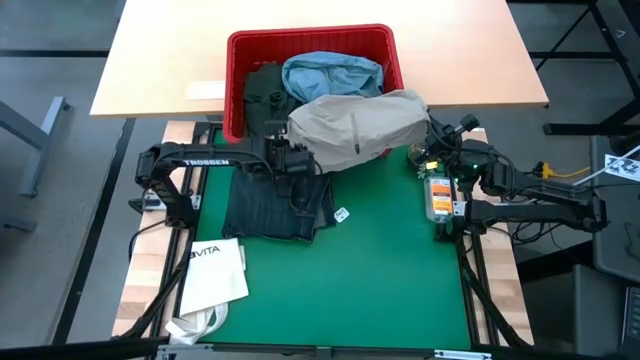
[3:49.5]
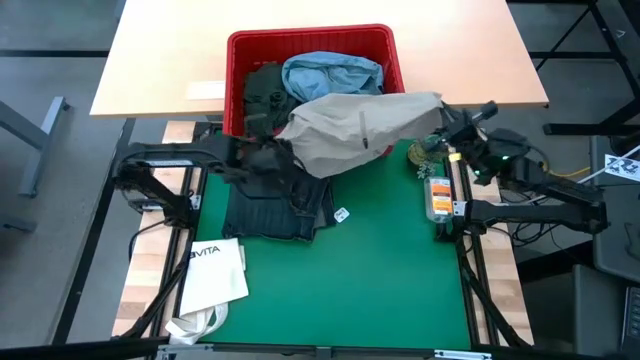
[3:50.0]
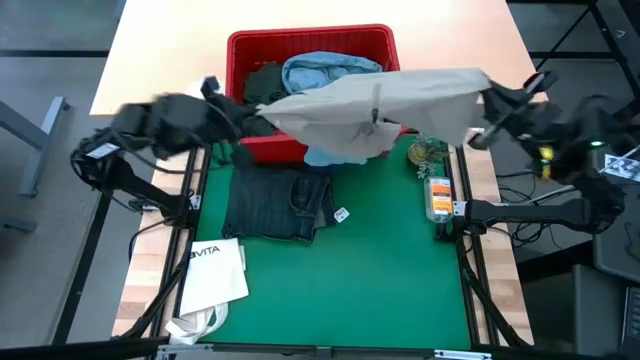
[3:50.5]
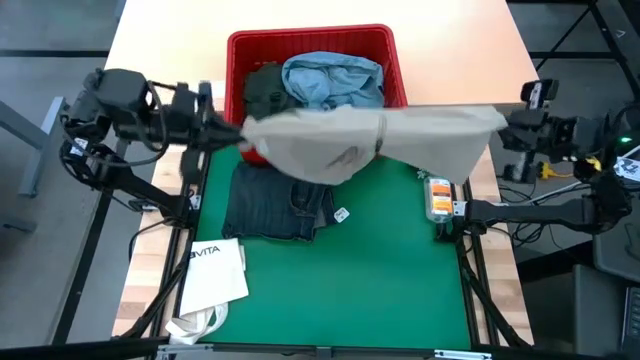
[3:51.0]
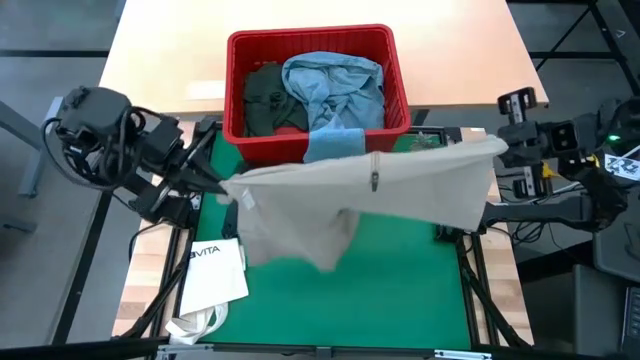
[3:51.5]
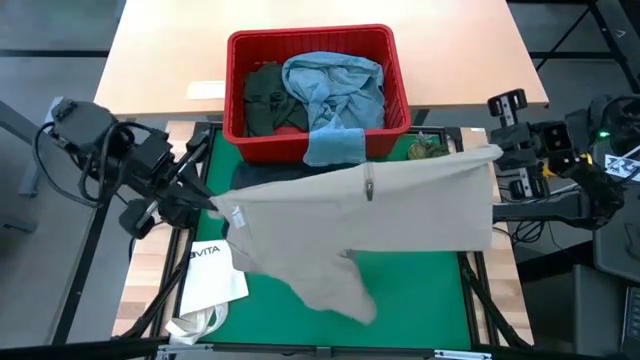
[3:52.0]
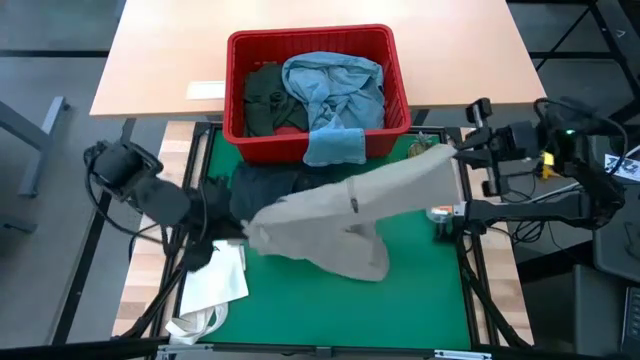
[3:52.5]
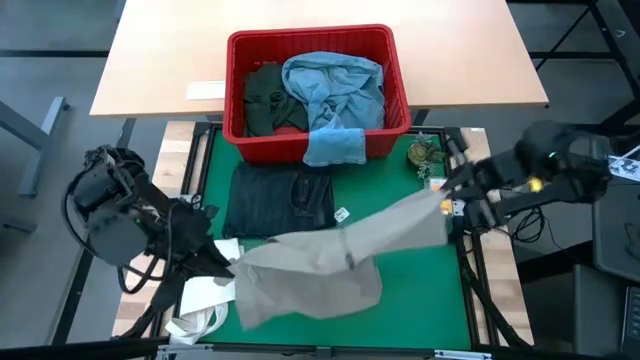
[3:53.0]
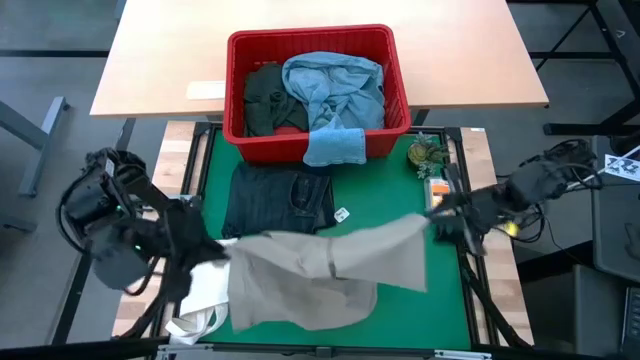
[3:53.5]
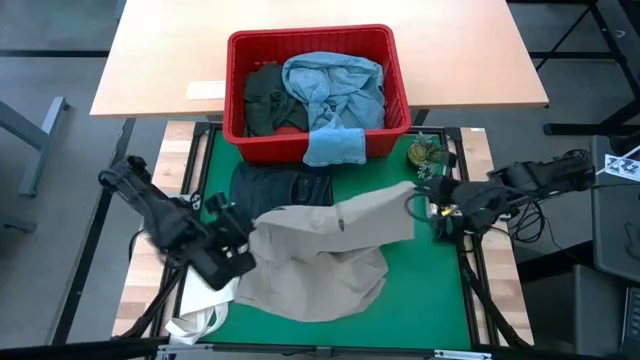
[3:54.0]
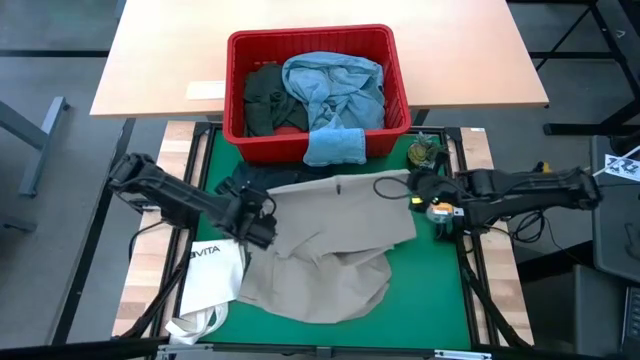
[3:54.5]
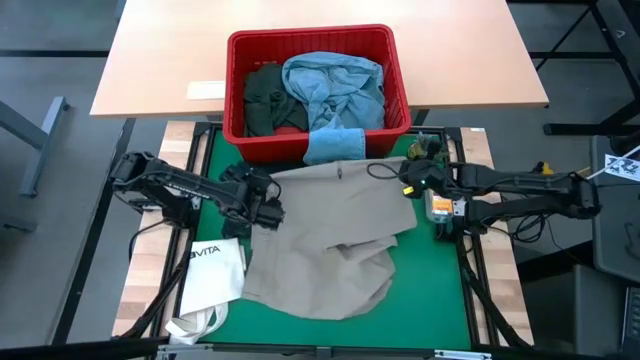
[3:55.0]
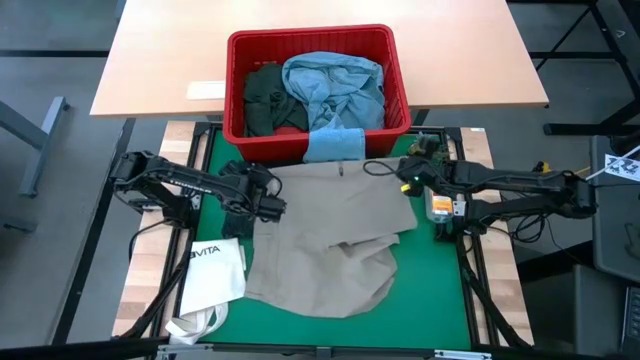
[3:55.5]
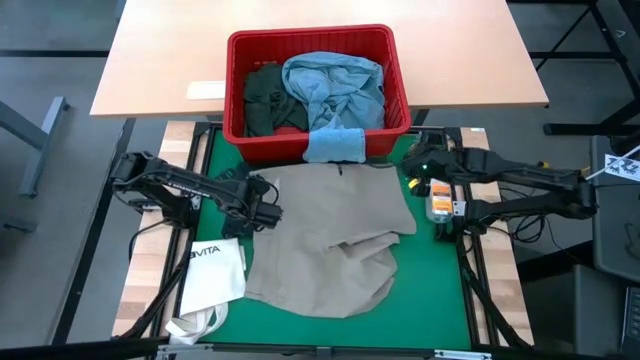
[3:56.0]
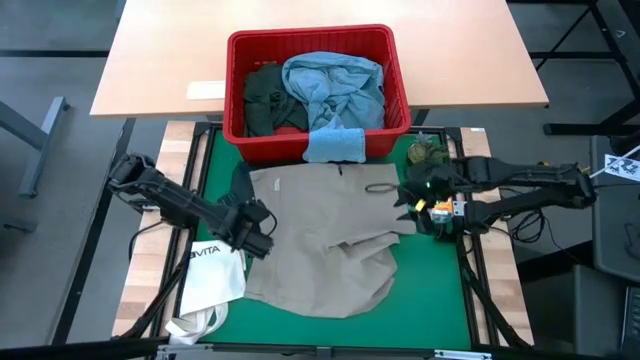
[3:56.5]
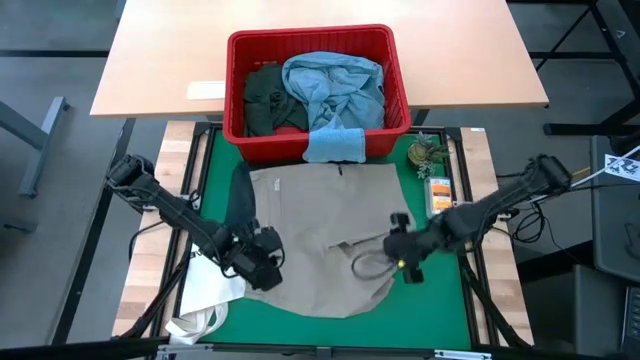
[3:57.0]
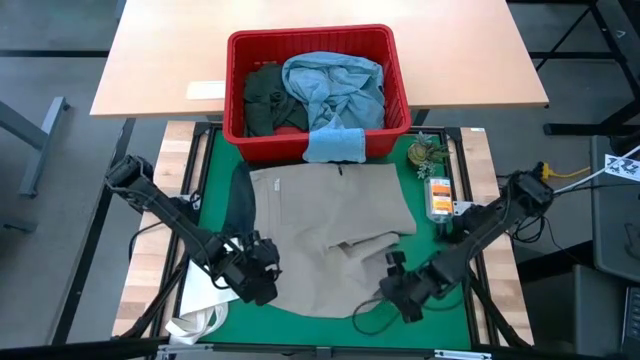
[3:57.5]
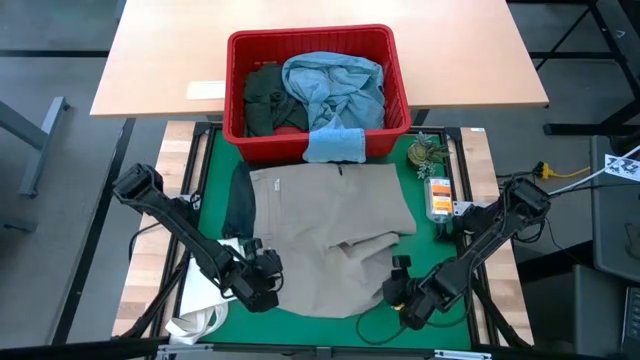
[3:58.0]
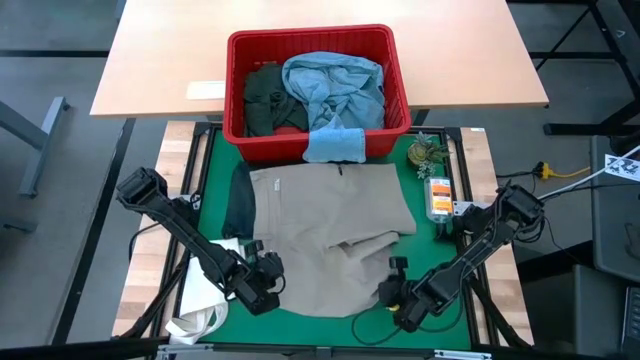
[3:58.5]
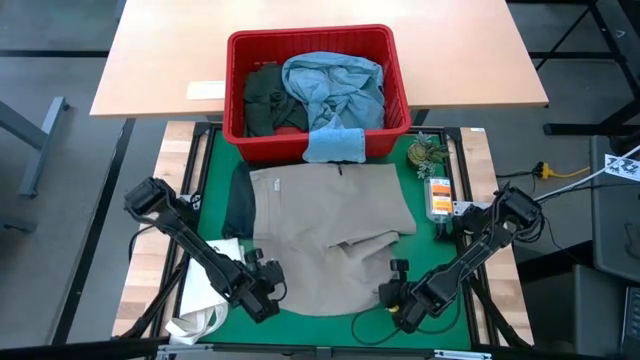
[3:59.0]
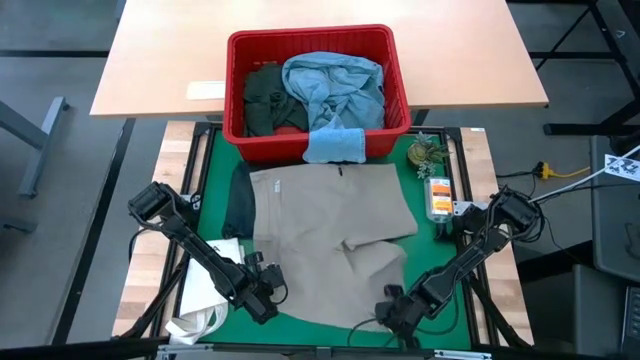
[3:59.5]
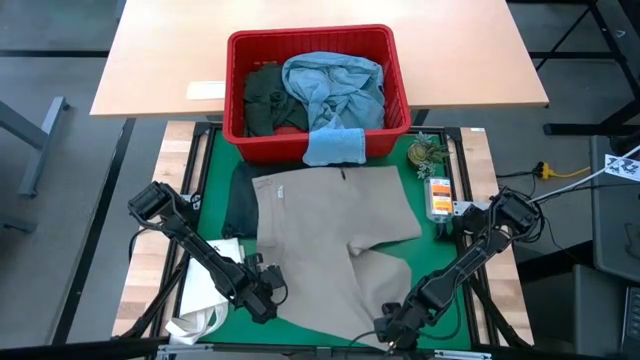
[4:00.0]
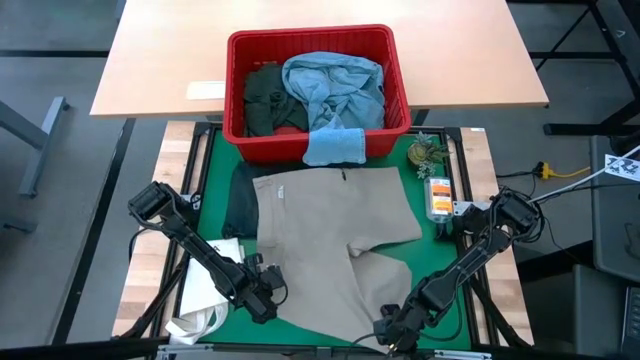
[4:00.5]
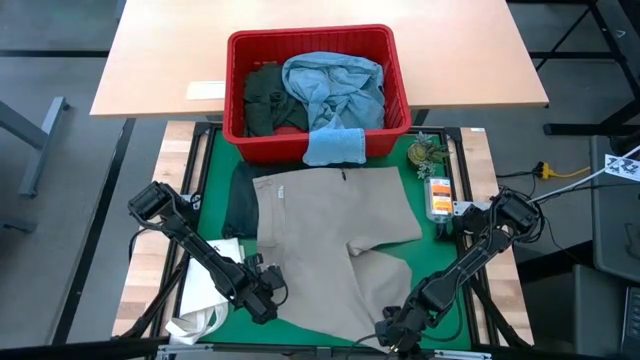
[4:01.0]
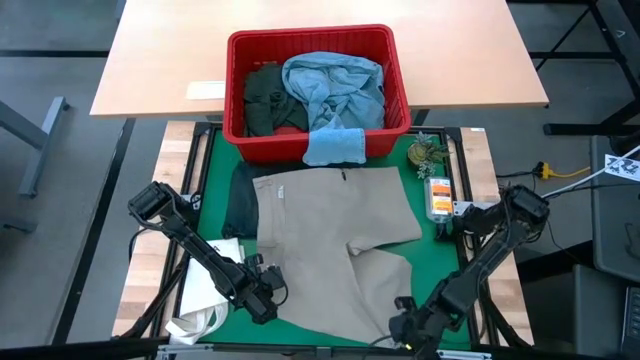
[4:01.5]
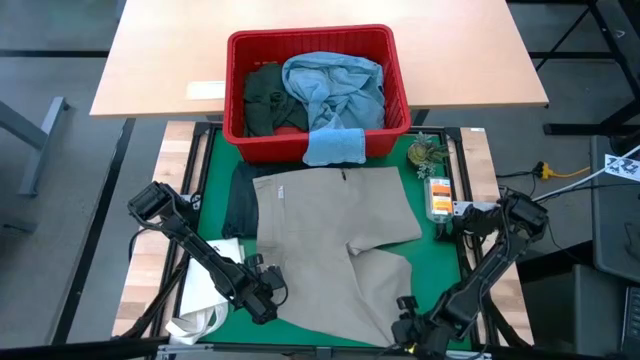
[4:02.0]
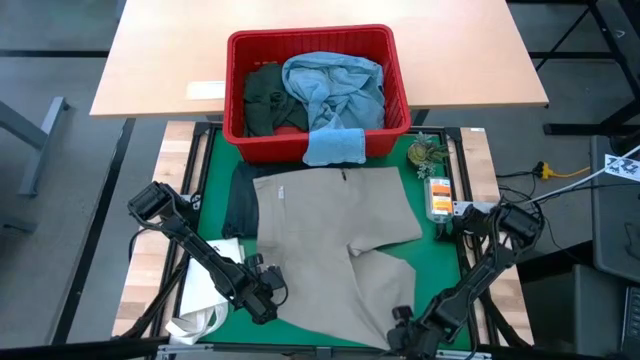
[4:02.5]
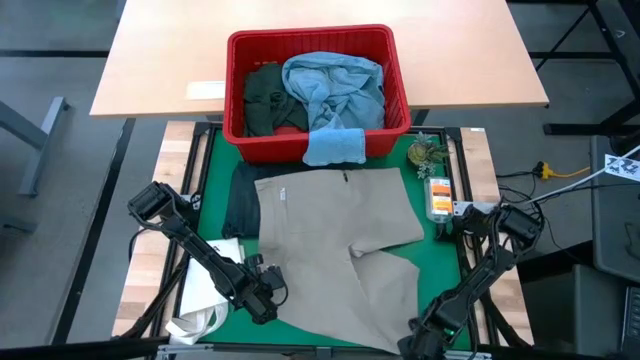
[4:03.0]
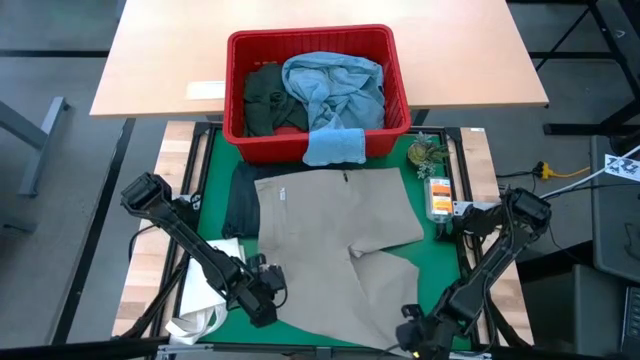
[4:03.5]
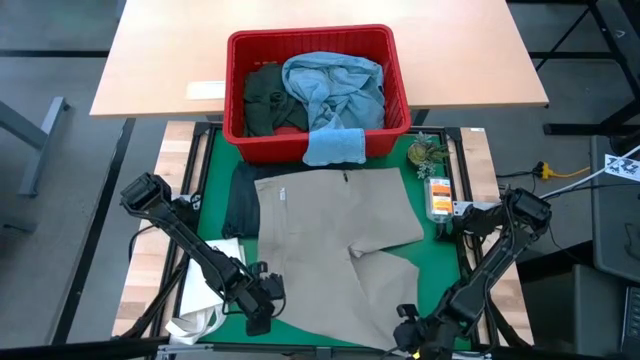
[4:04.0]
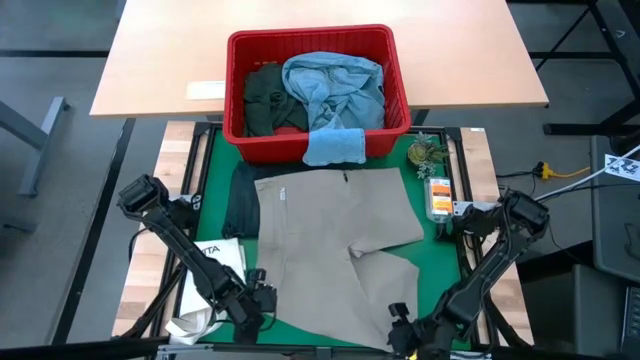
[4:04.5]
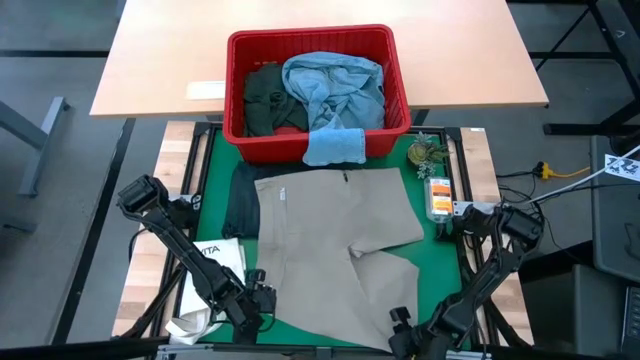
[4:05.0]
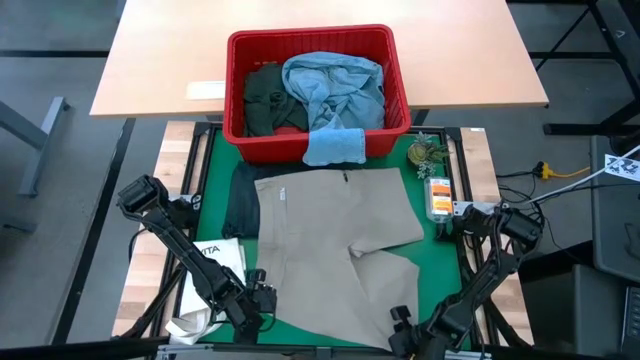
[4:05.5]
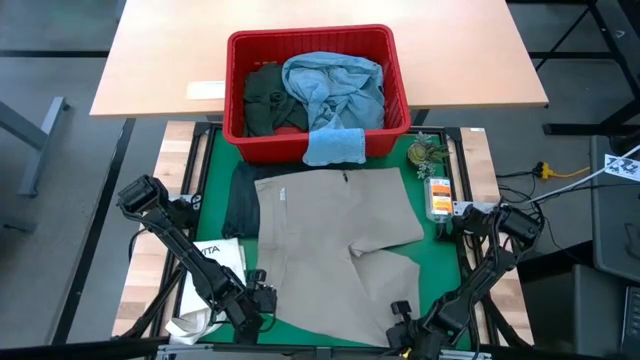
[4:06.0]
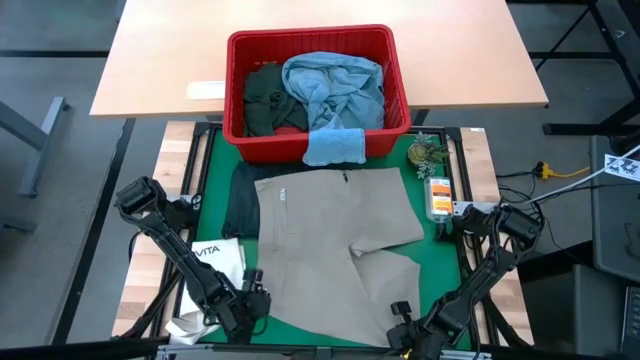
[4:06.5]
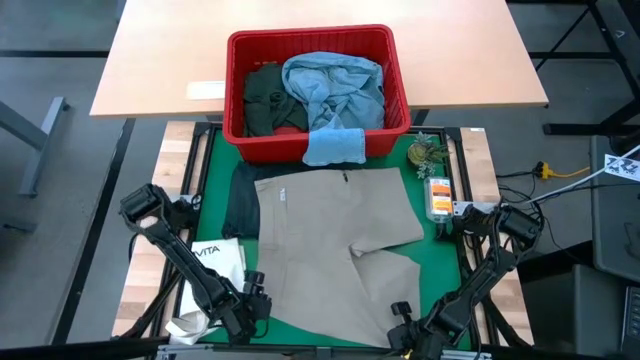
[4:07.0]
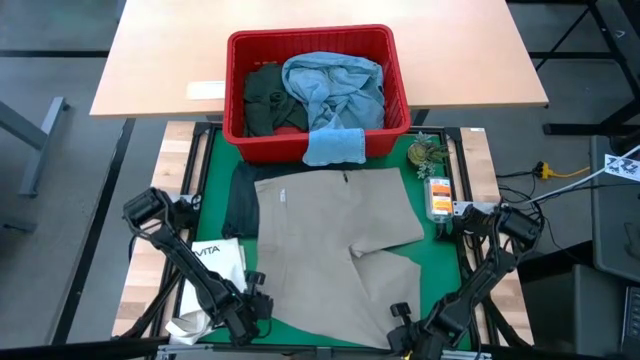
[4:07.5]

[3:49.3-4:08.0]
Task: Fold Laundry from Bin
Fold the brown shorts

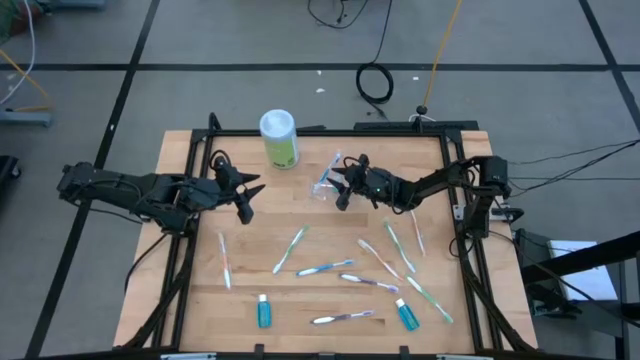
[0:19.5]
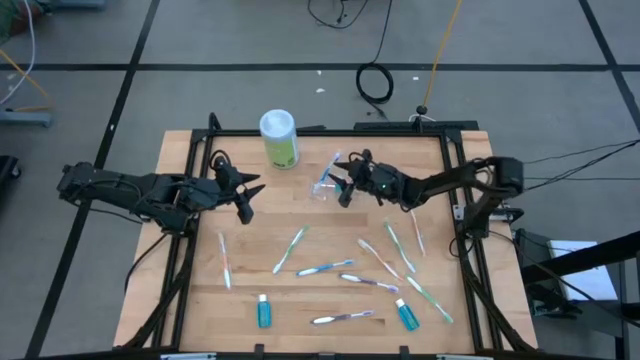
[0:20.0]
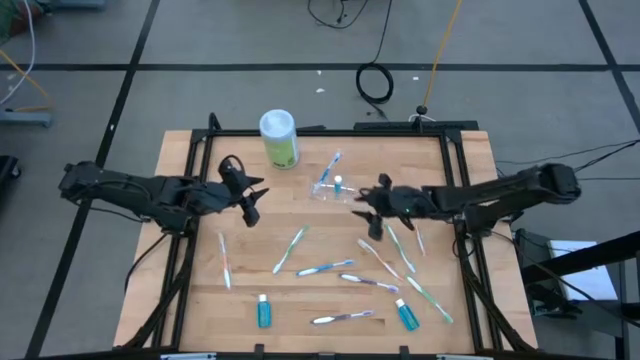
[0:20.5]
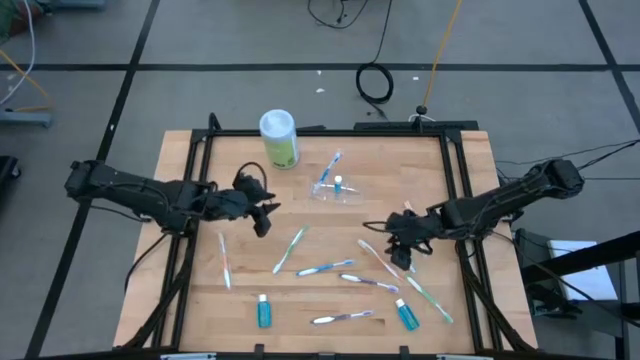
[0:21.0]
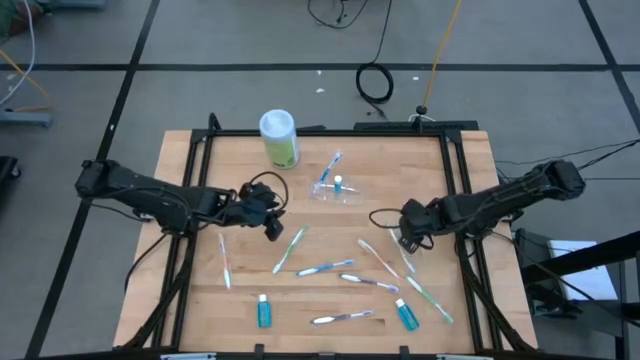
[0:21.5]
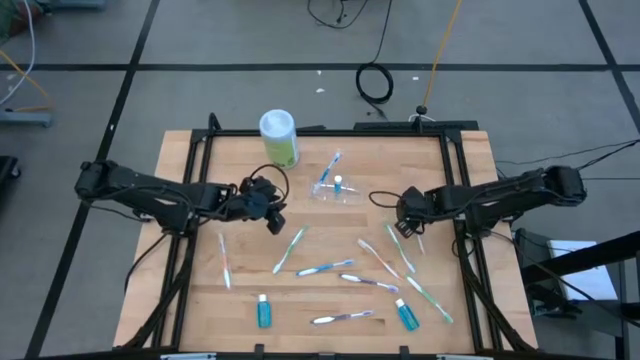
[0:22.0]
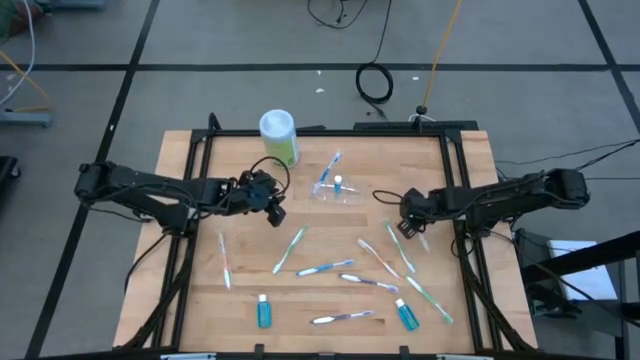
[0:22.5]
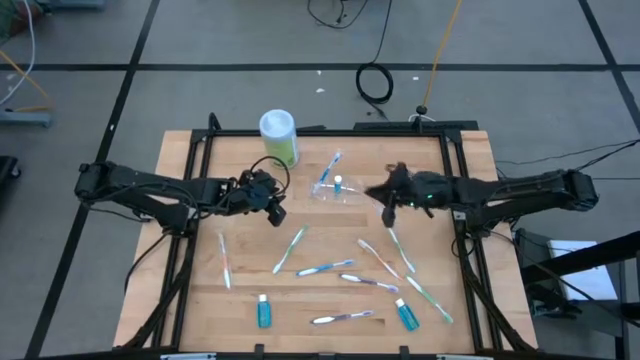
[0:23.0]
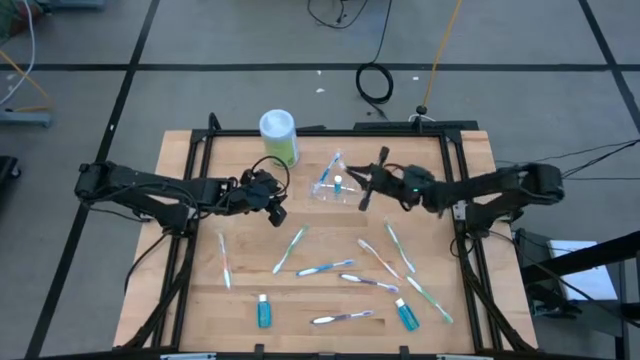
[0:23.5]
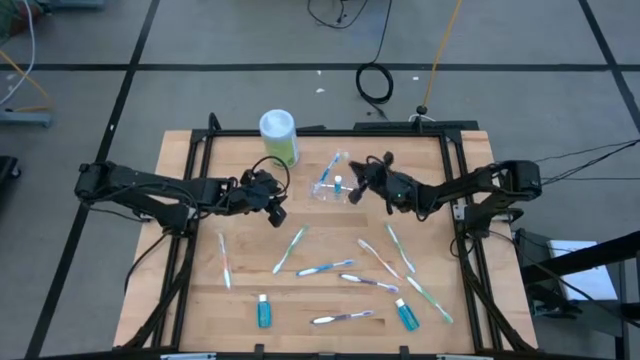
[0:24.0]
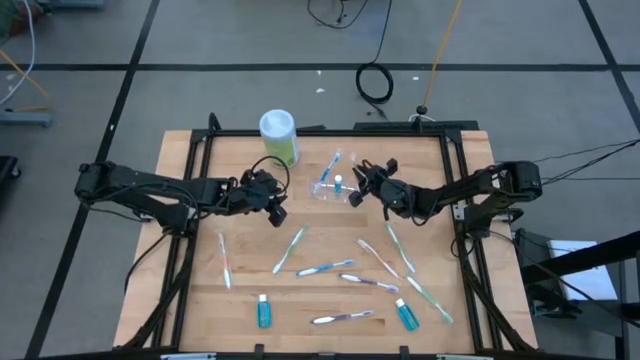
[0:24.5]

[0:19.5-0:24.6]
Task: Pick & Place toothbrushing station
Put the right orange toothbrush into the transparent organizer
